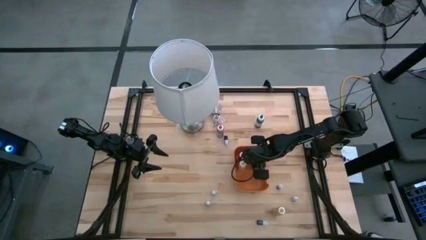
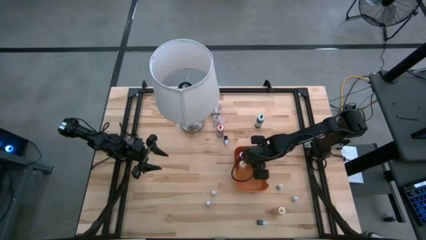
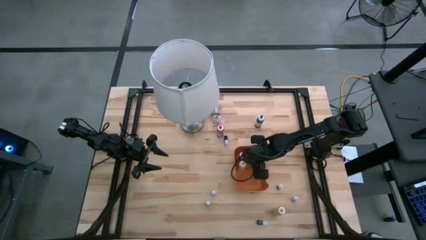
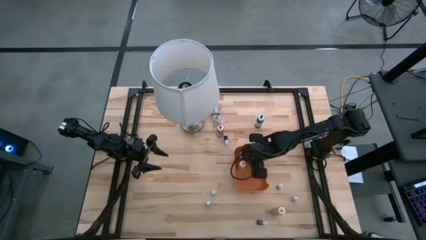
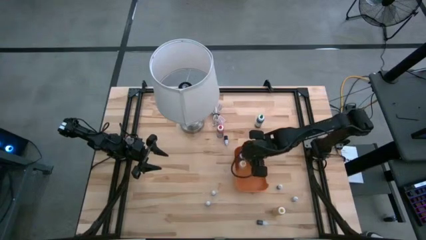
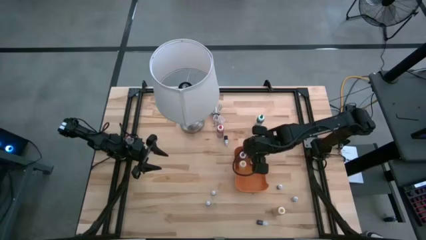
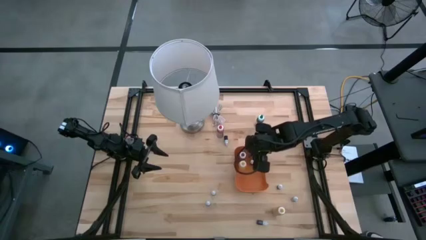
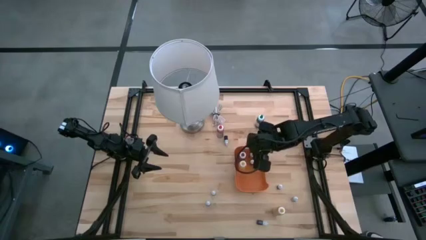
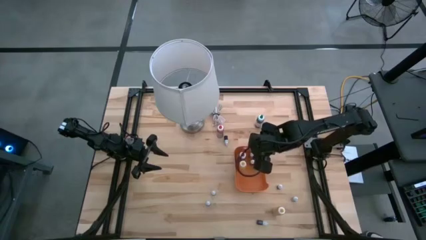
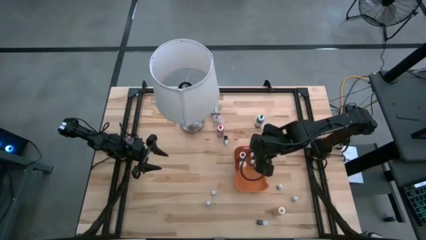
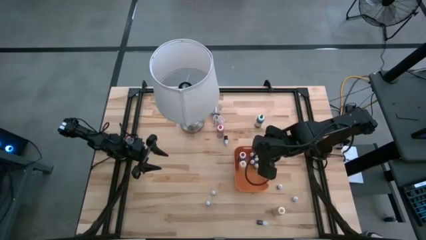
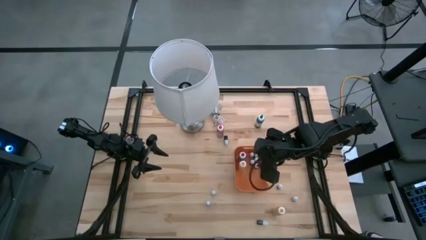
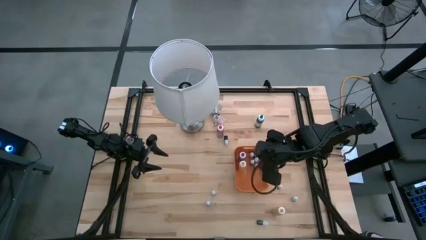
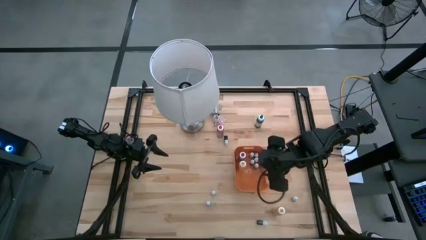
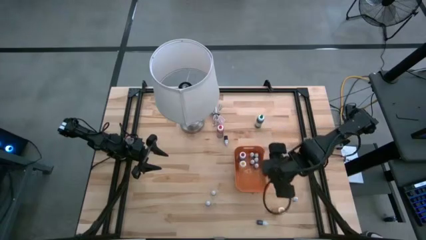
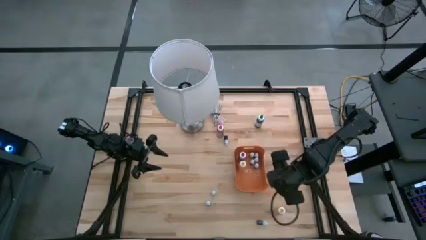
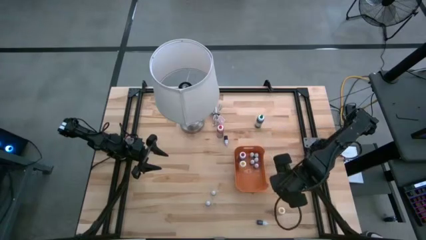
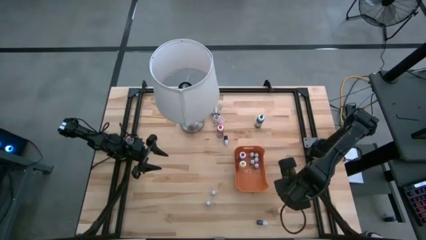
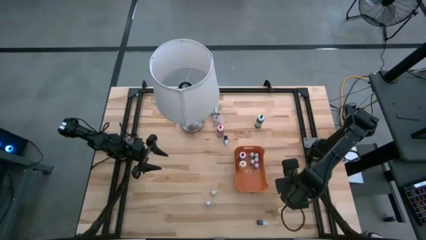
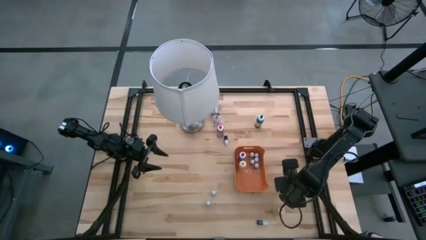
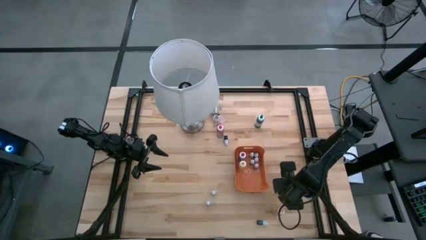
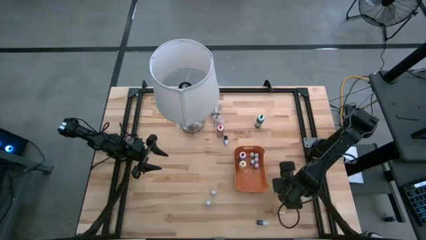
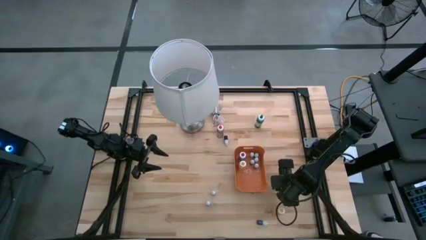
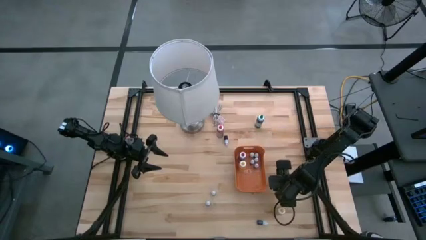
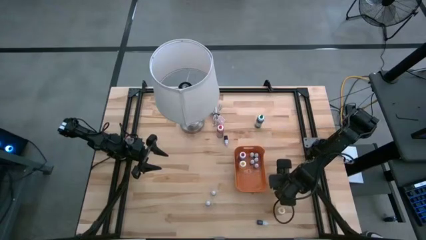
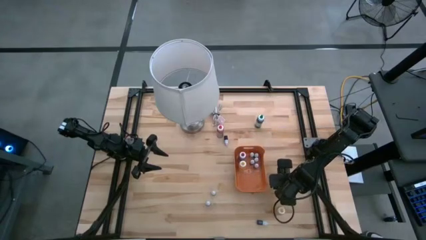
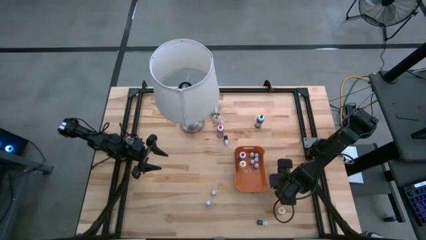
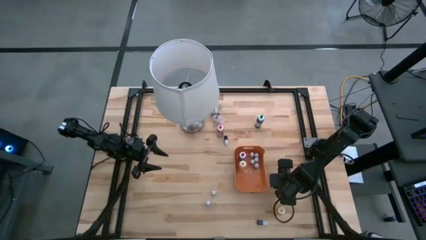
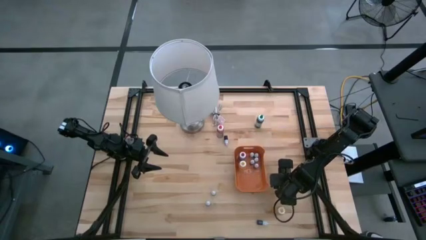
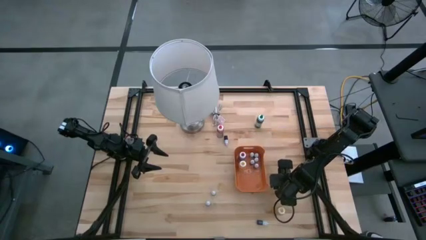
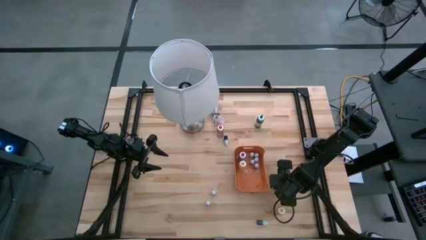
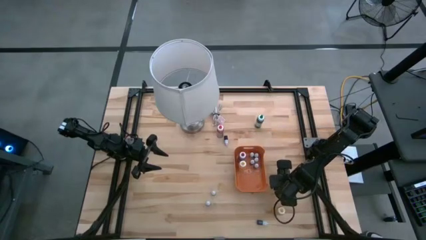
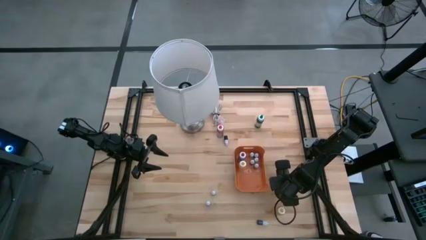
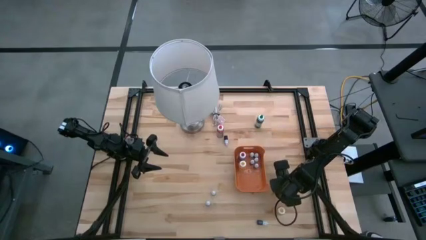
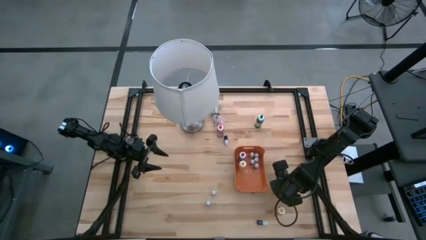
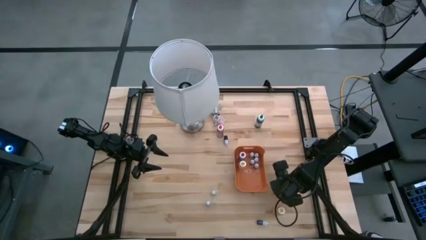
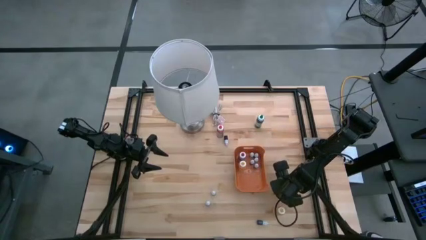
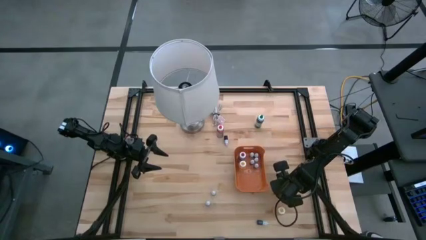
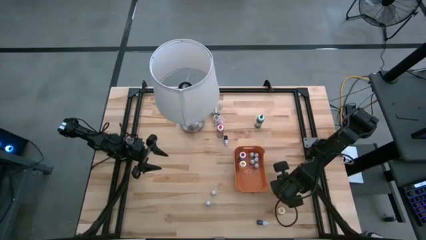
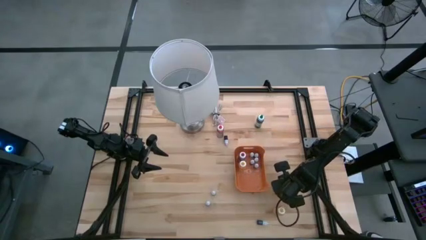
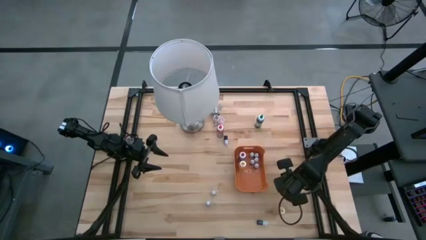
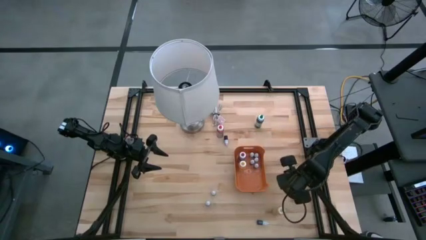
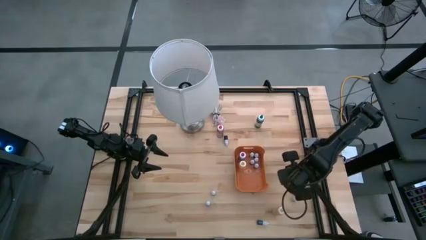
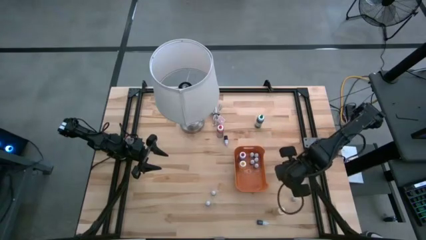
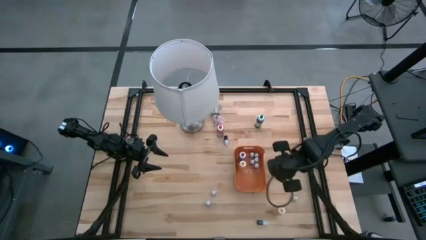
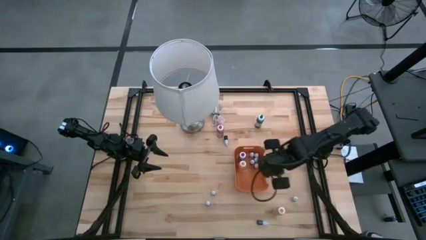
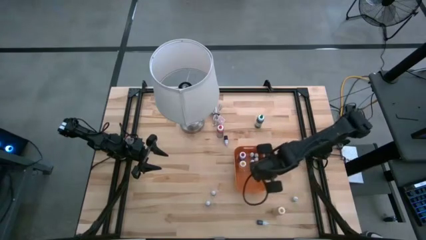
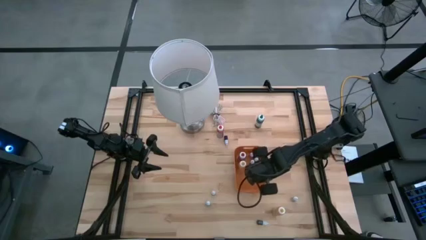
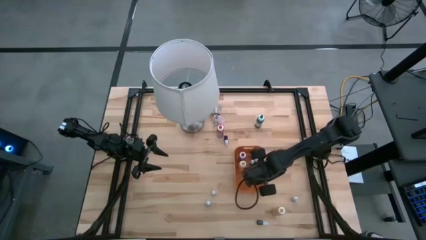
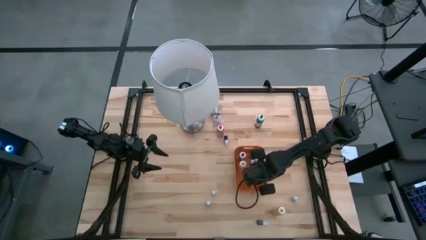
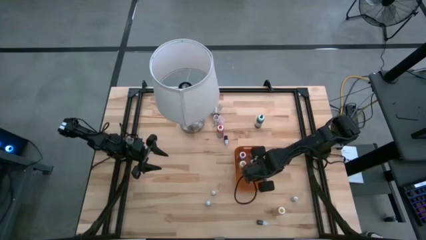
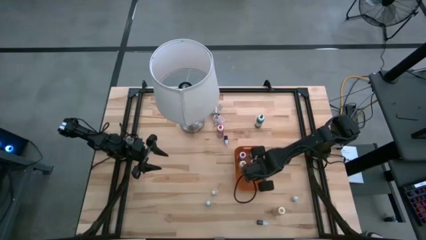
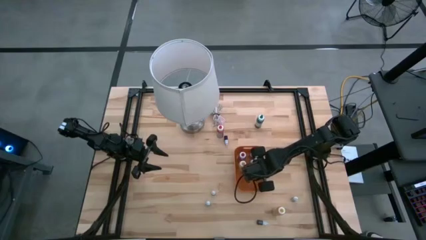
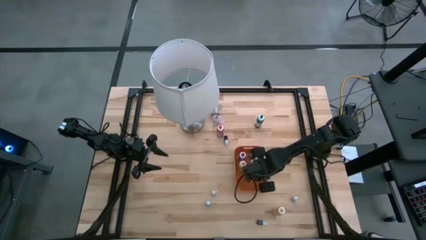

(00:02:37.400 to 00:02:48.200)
Task: Pick & Place food coloring
Put the small food coloring bottle into the orange bin
